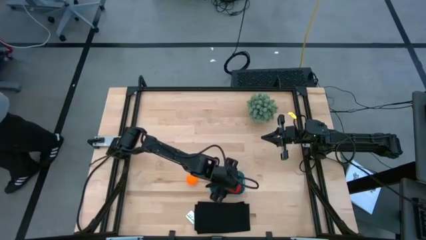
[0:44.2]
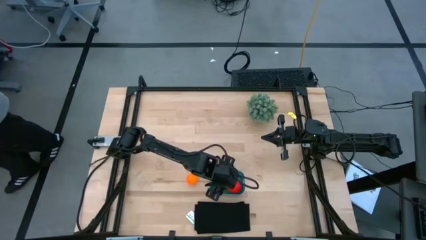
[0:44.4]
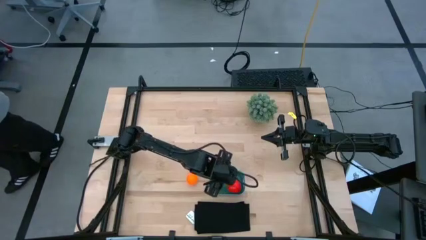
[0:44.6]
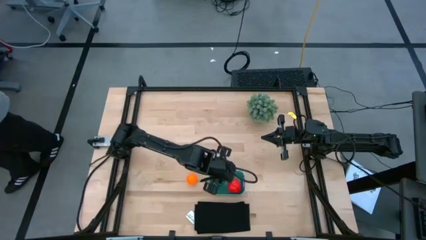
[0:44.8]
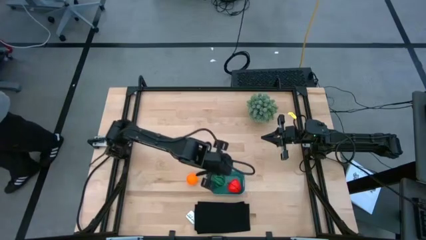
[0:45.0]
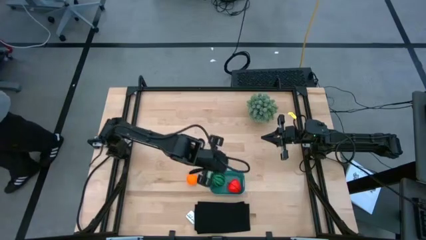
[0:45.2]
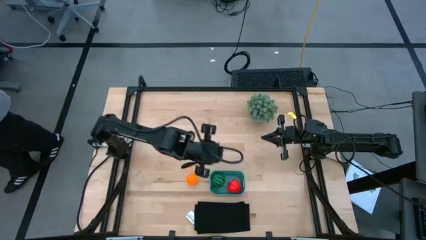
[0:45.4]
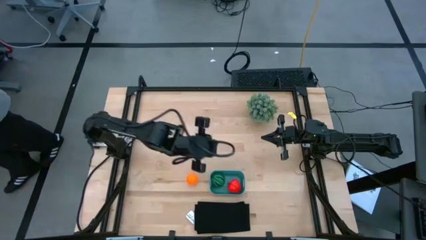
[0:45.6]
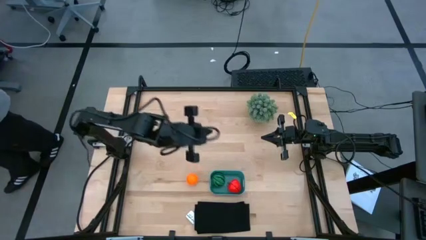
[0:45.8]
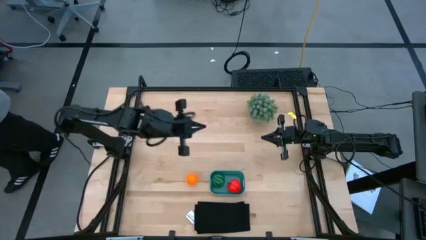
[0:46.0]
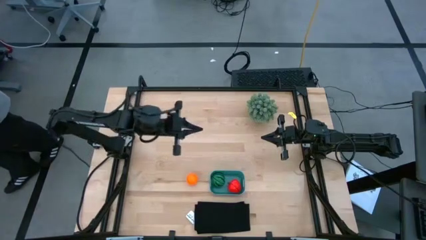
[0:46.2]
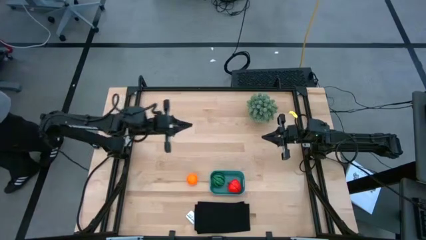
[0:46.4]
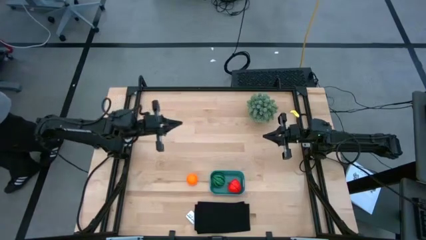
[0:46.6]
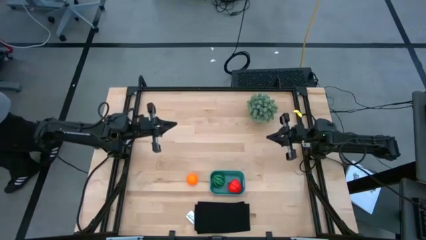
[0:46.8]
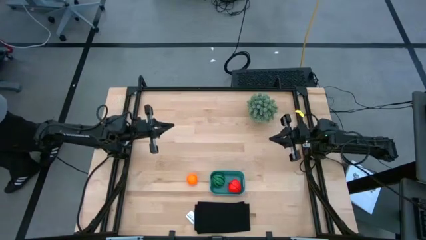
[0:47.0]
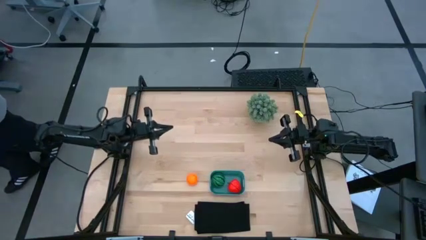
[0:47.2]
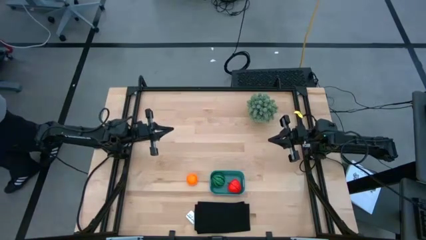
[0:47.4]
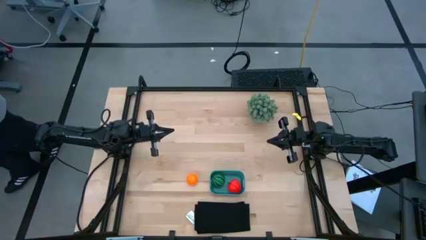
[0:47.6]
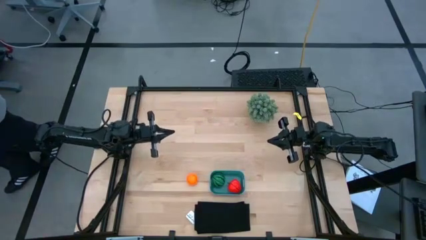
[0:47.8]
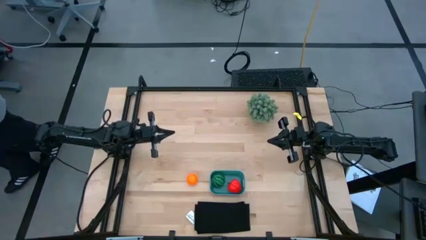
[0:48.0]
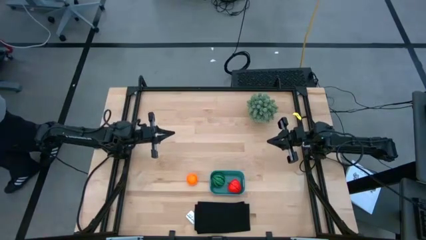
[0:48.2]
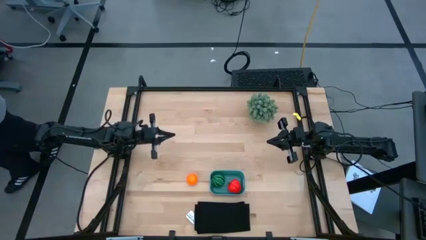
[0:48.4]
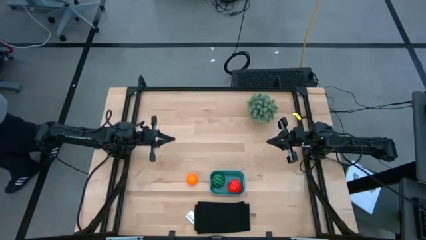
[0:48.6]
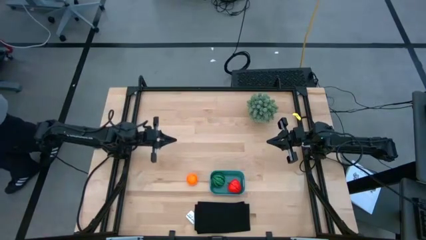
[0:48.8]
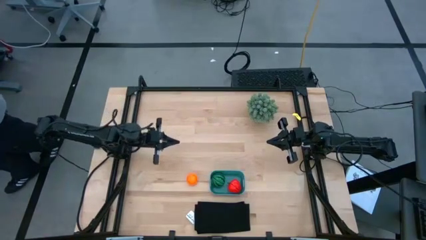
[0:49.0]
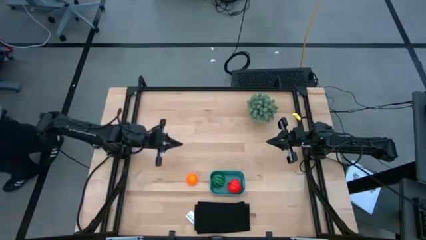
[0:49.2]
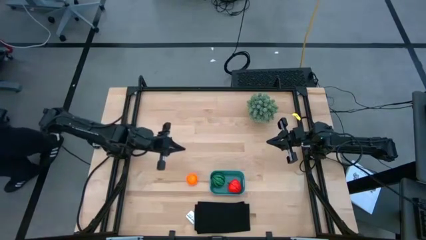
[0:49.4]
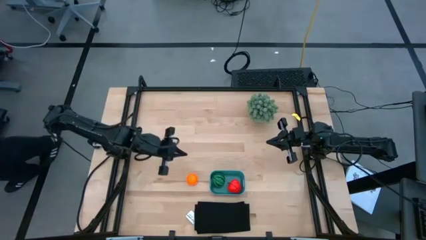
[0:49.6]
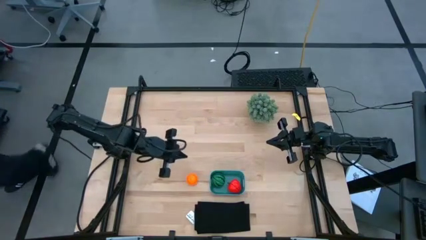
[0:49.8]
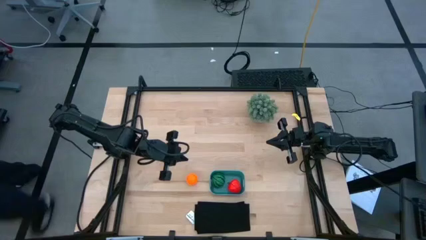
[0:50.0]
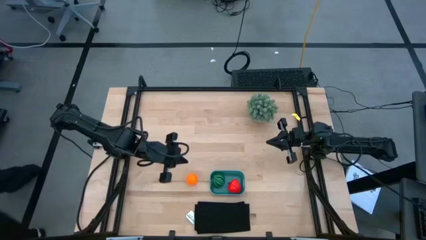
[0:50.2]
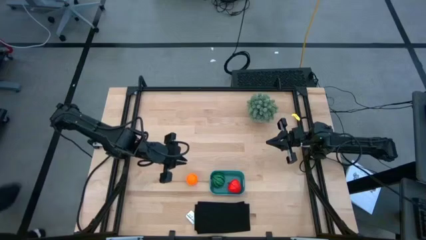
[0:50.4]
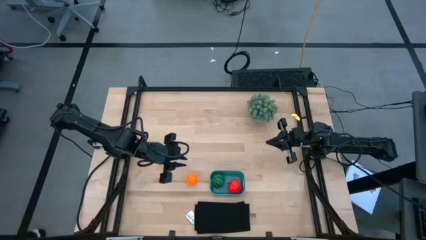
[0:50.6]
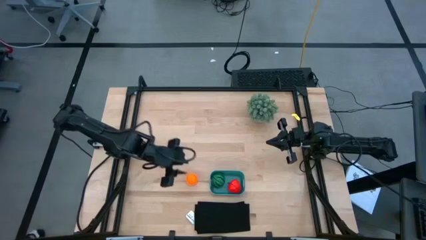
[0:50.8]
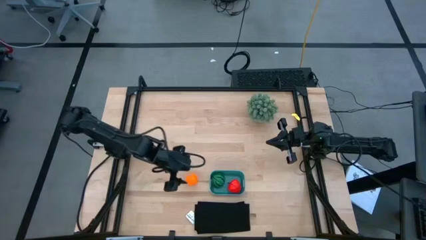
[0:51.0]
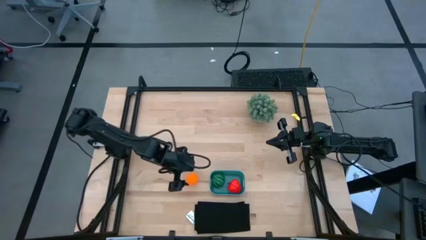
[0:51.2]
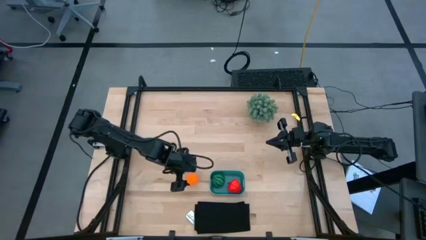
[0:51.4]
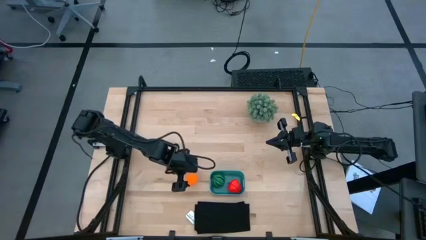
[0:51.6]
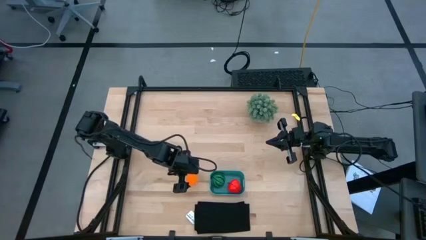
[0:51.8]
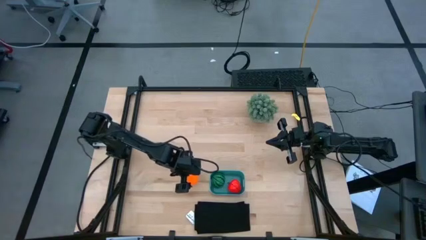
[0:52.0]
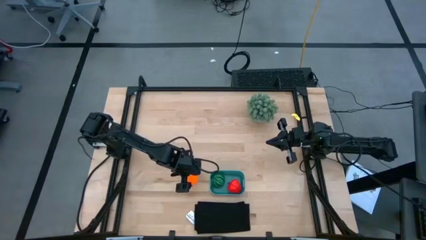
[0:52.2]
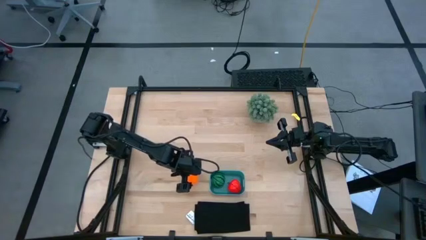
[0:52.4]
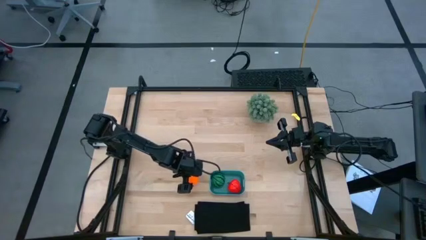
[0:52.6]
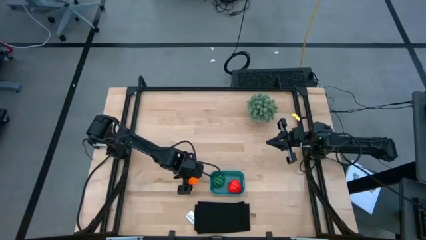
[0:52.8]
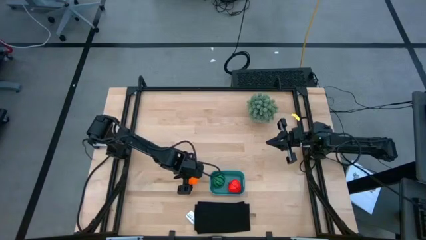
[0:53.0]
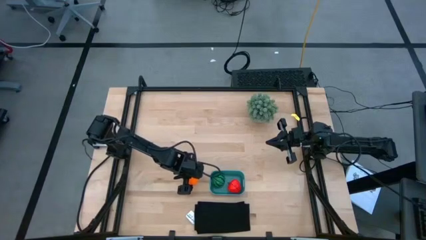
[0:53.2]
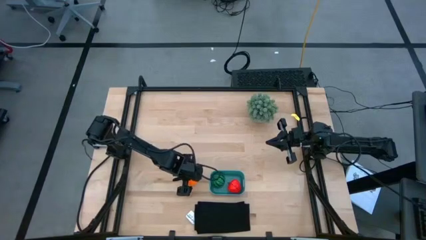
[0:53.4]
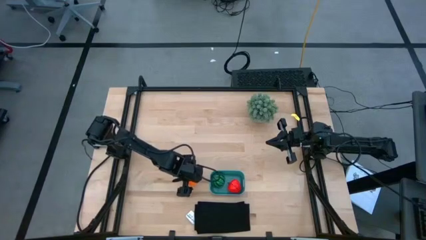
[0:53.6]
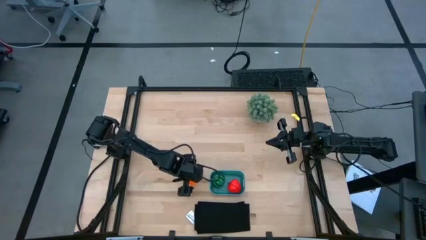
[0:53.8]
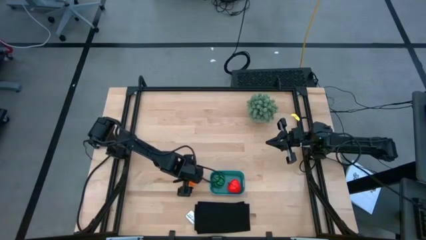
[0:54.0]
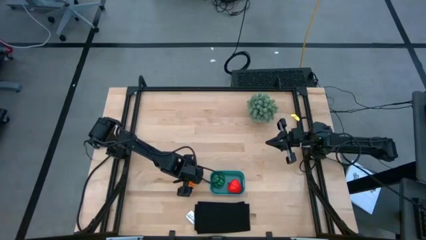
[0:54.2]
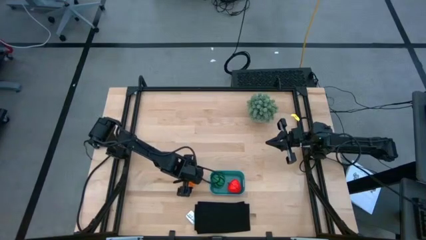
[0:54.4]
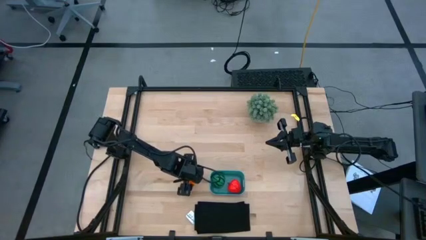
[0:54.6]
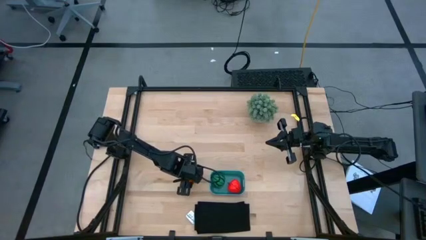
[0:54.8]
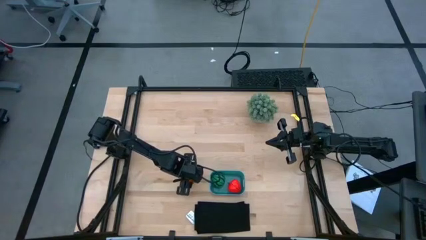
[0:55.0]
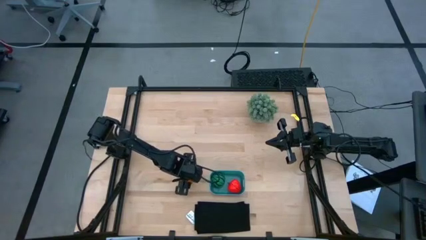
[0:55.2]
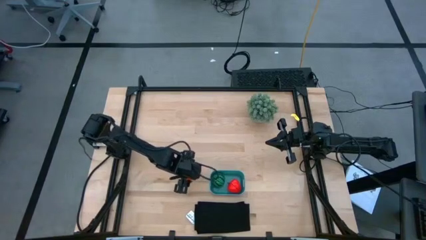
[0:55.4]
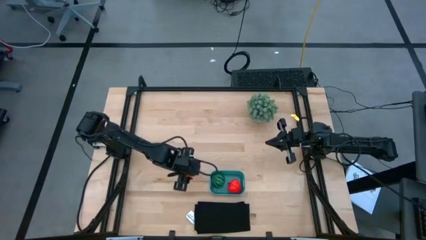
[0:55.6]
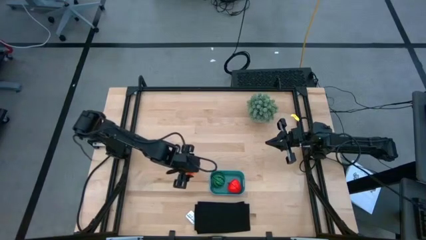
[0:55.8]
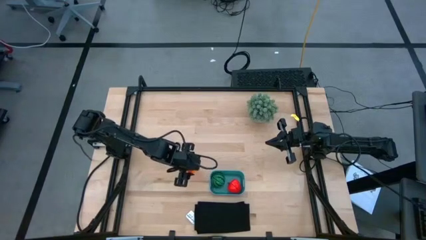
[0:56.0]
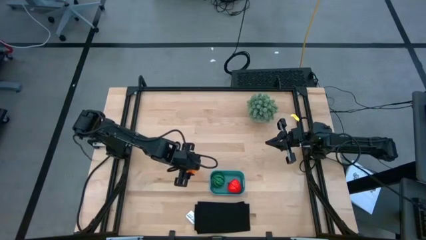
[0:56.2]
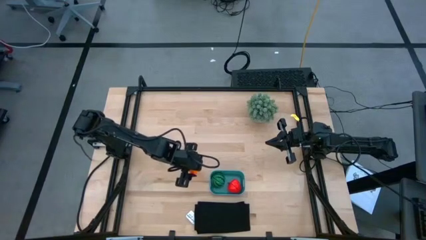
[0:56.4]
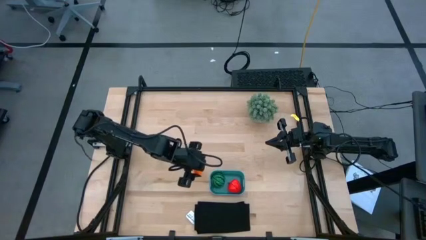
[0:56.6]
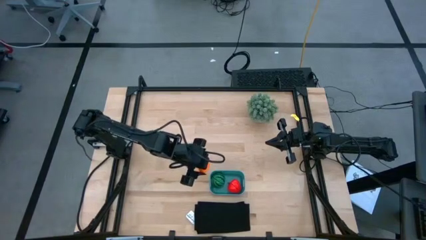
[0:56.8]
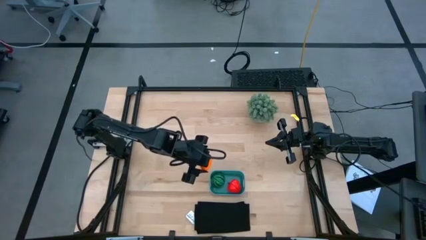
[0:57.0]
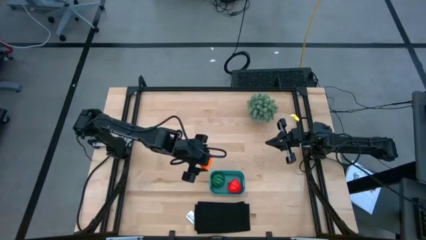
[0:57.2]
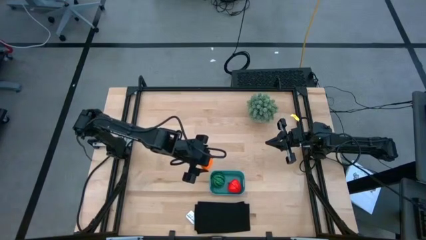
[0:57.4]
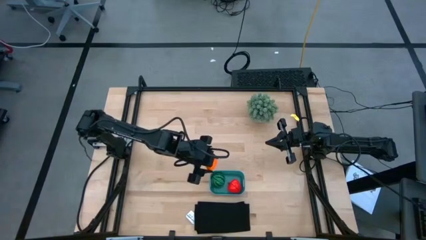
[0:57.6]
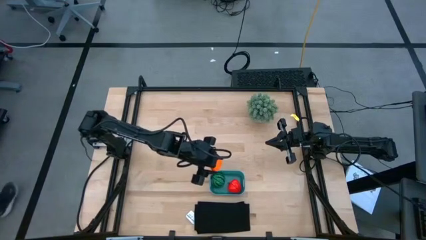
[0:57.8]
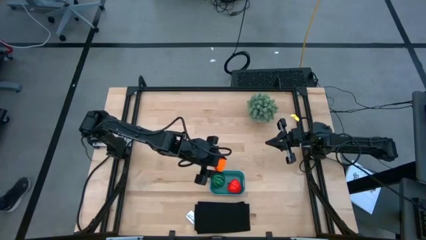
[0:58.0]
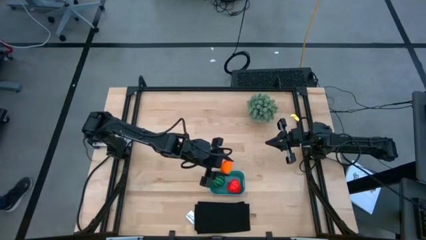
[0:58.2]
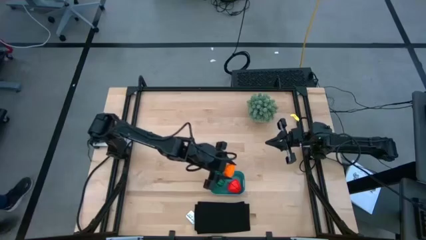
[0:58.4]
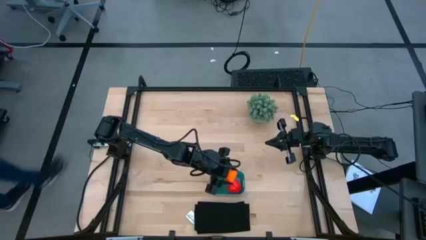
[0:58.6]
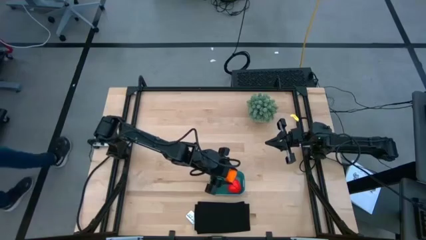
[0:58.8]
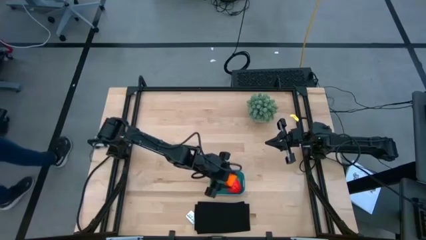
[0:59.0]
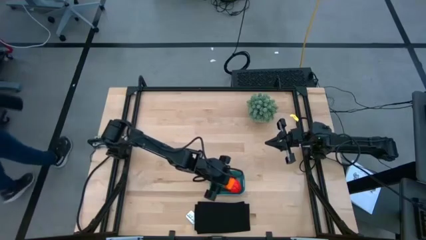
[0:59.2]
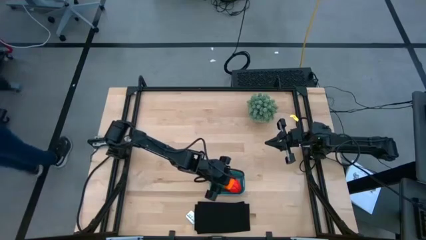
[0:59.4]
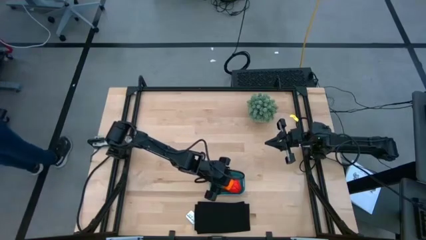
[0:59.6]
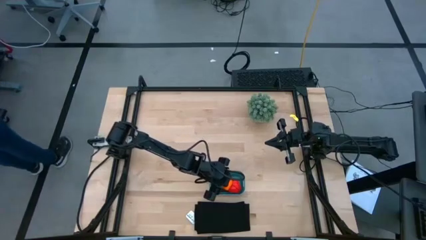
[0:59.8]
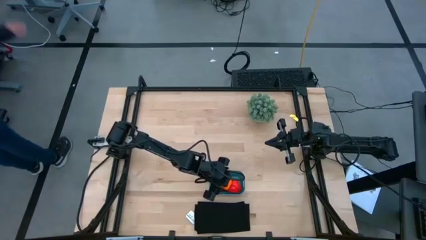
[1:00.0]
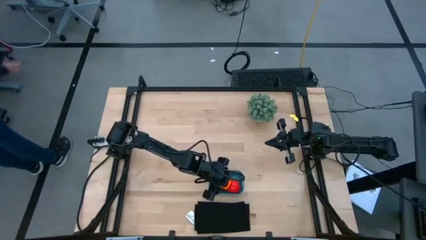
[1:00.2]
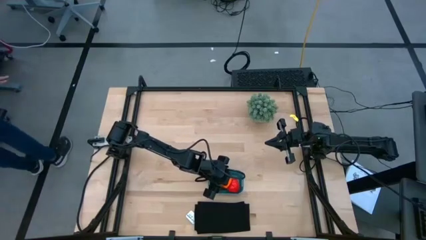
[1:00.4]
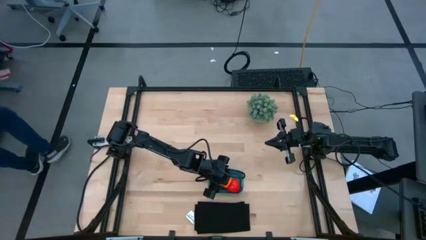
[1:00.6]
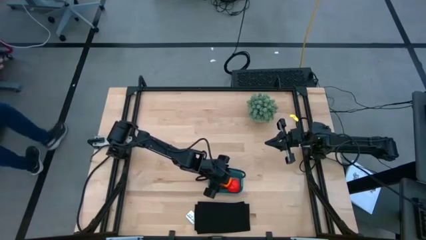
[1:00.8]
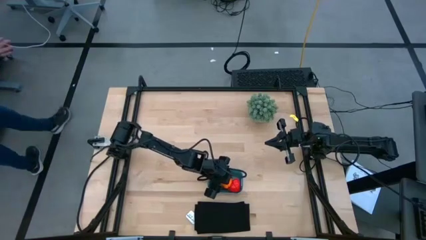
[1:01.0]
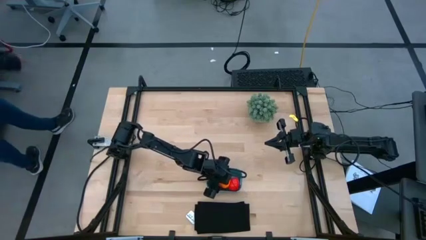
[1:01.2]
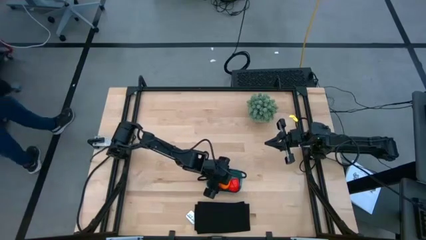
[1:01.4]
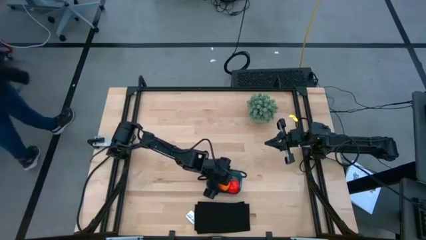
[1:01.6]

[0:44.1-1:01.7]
Task: Pick and placing Produce into tupperware
Put the orange toy into the green bin
